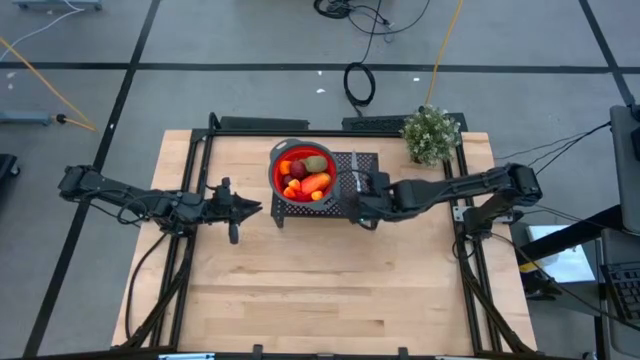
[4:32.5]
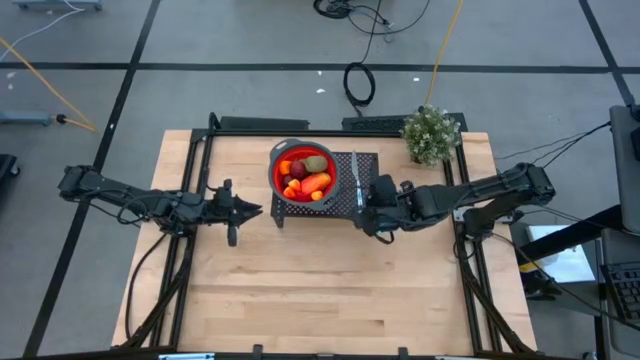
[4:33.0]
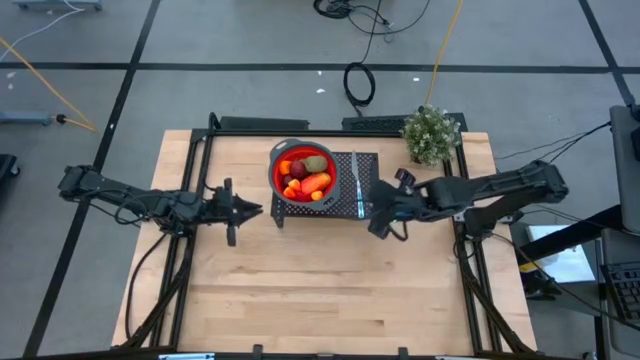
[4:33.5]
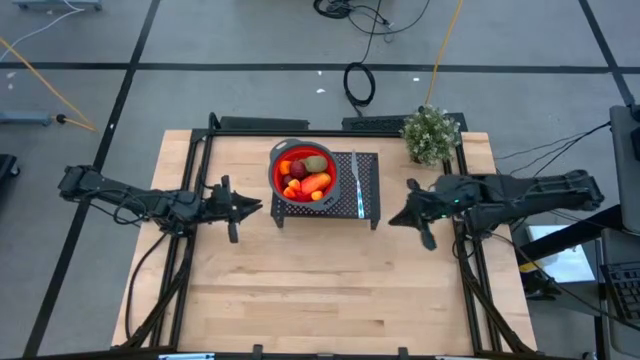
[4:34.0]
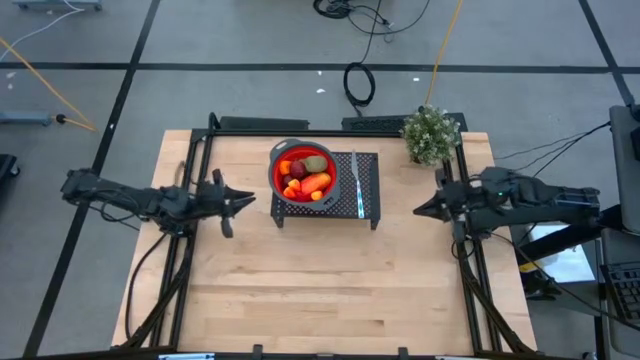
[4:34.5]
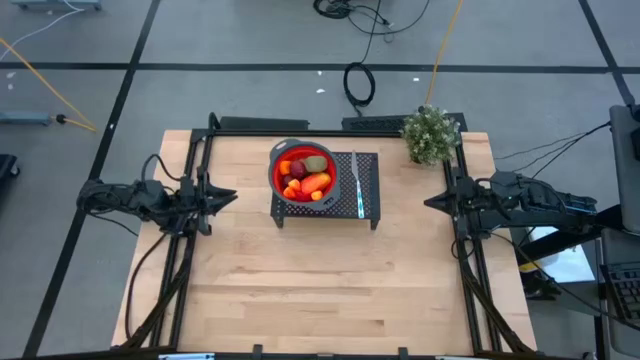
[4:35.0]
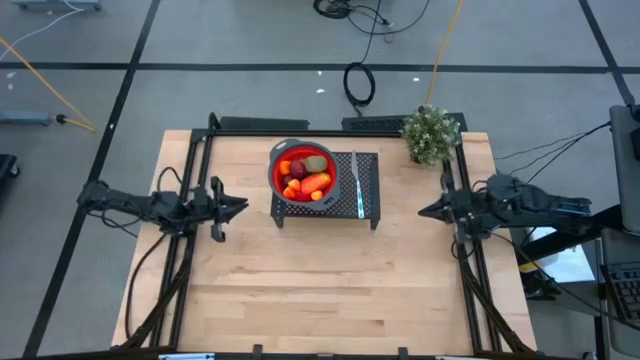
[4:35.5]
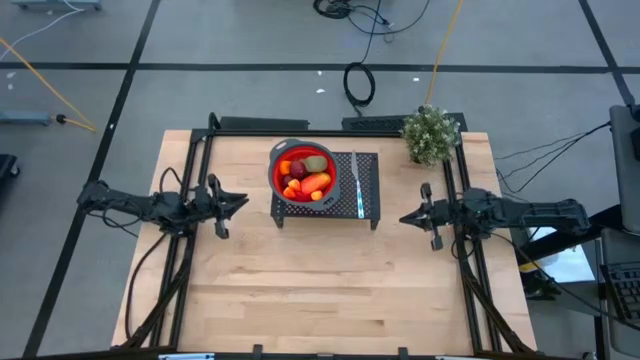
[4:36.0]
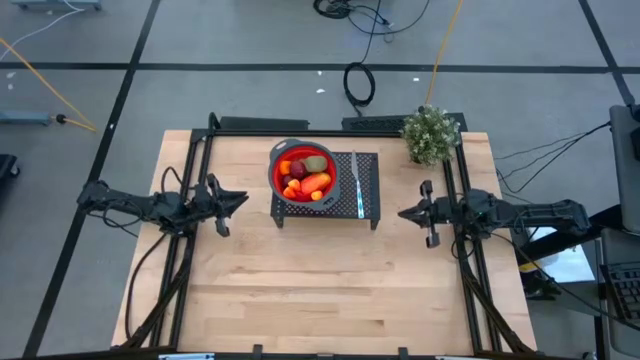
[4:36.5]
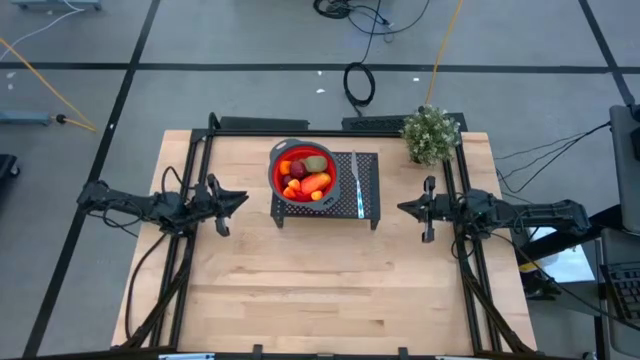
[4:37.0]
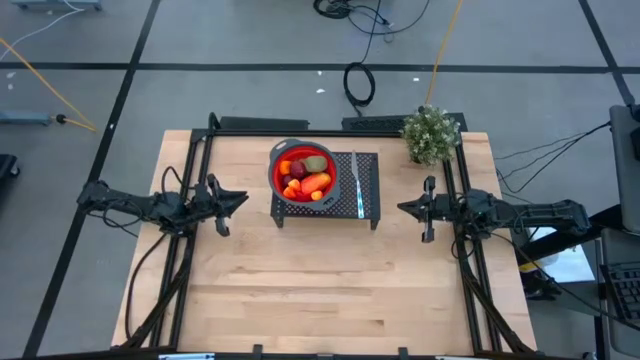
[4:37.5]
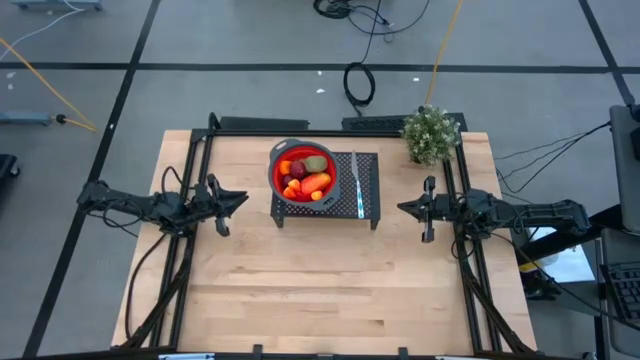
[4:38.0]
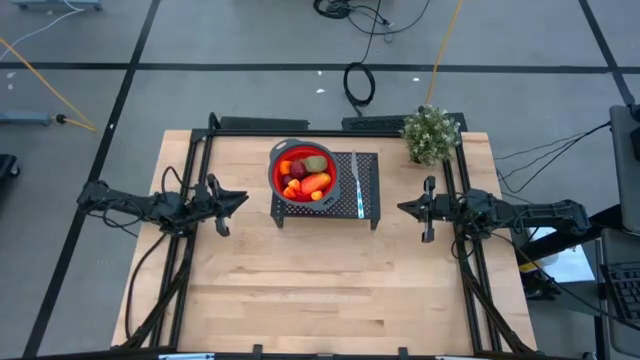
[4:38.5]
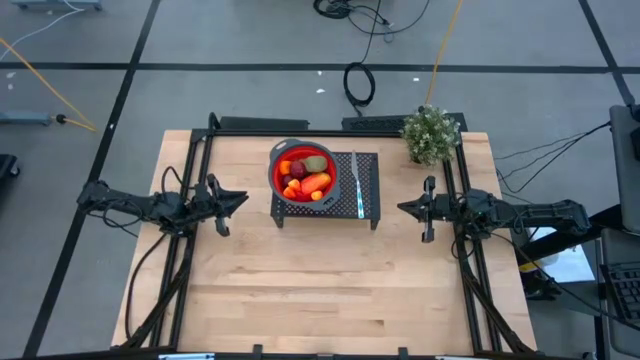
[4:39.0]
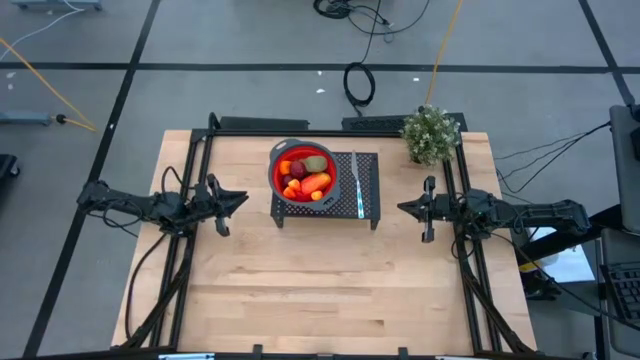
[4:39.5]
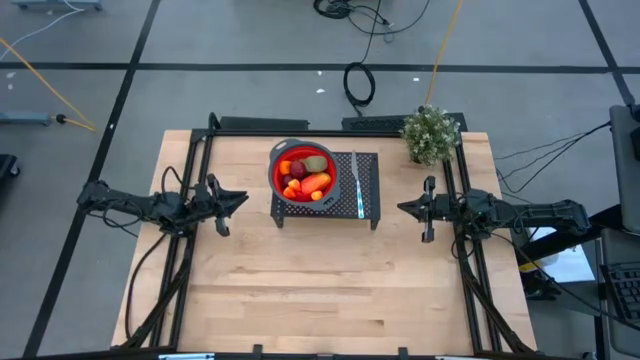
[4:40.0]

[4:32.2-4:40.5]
Task: Pick & Place Fruit
Return to Home Position

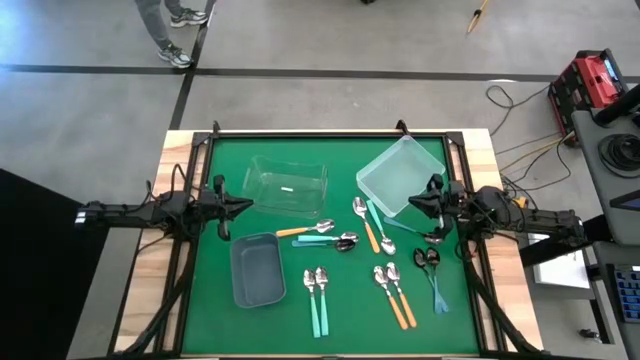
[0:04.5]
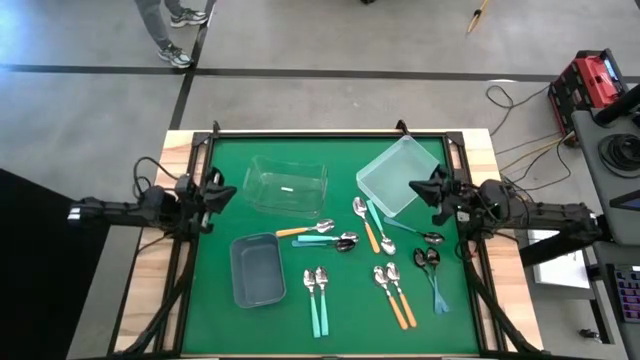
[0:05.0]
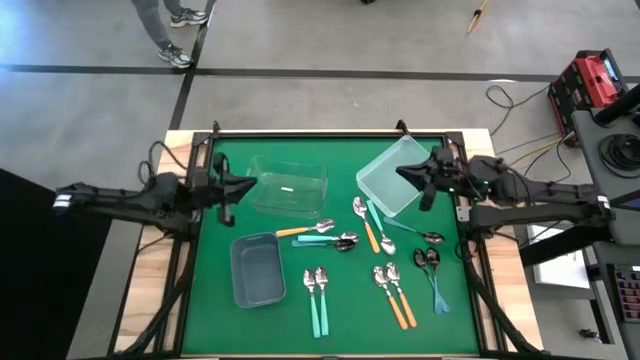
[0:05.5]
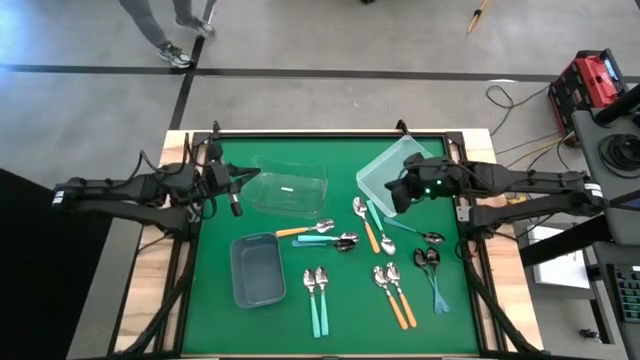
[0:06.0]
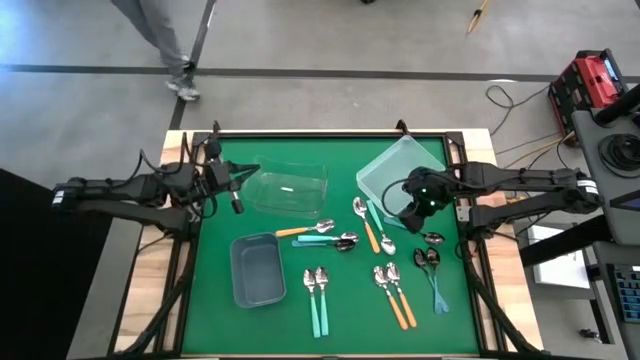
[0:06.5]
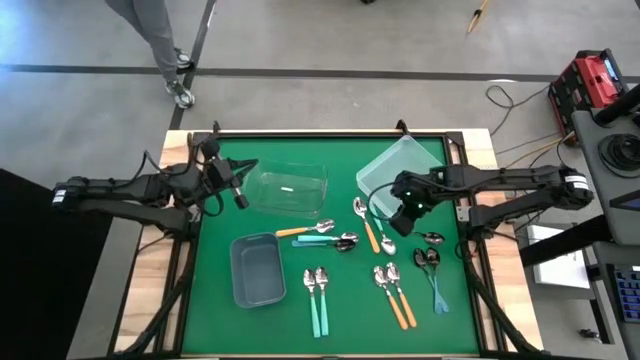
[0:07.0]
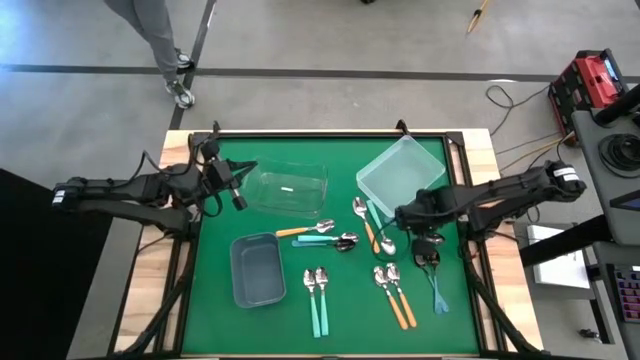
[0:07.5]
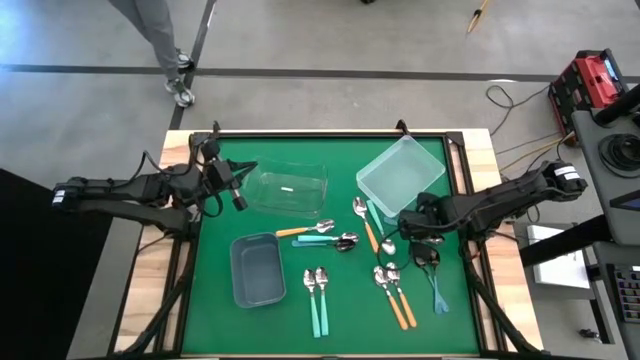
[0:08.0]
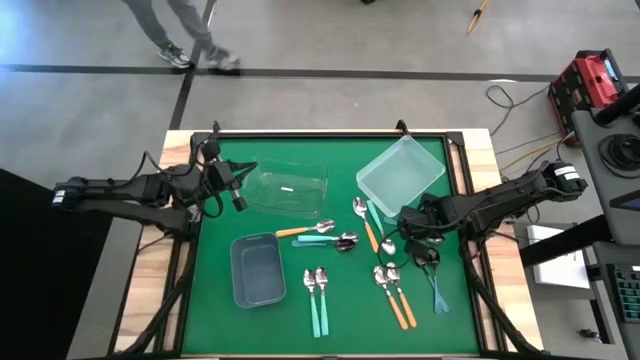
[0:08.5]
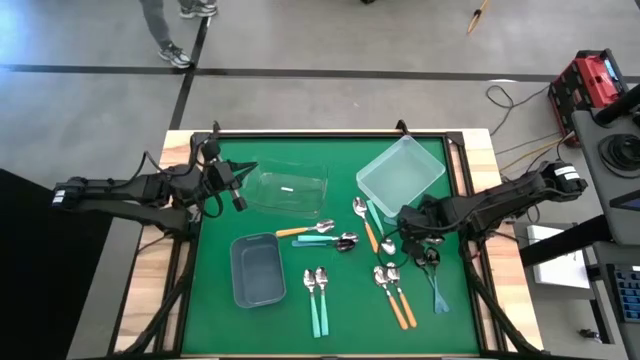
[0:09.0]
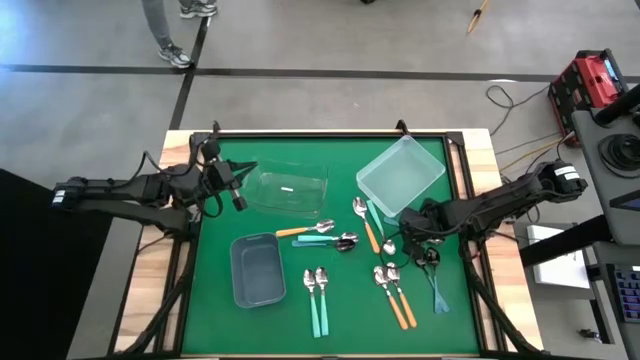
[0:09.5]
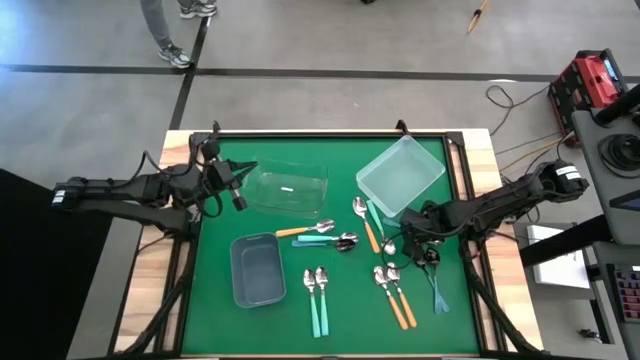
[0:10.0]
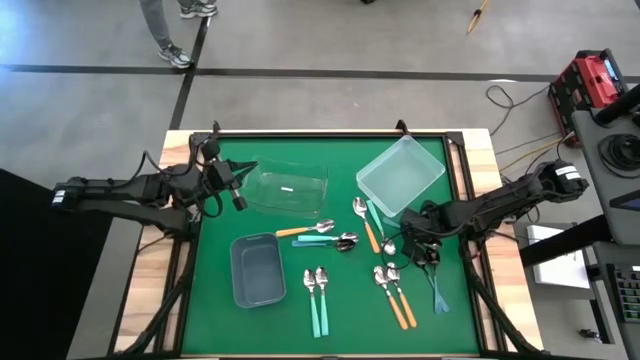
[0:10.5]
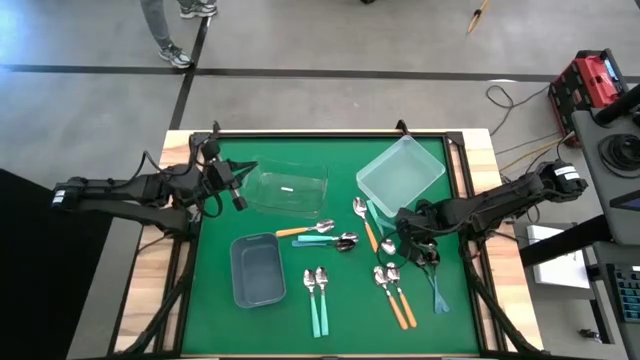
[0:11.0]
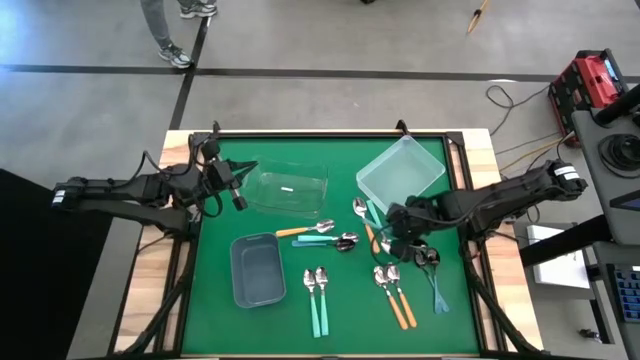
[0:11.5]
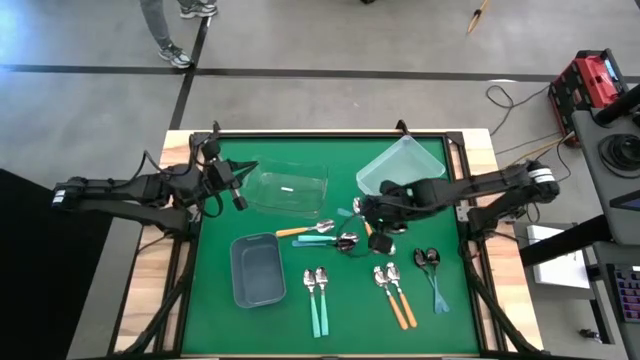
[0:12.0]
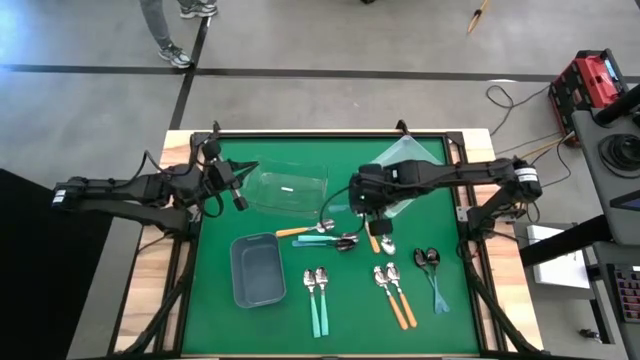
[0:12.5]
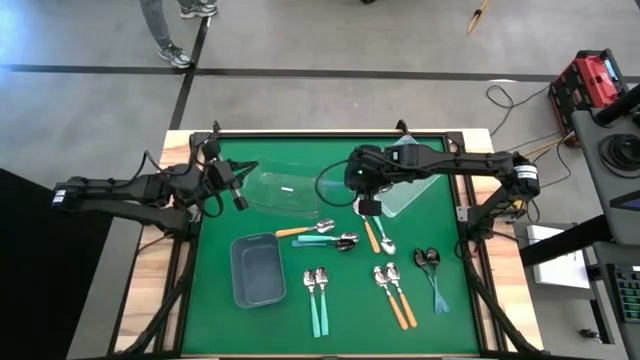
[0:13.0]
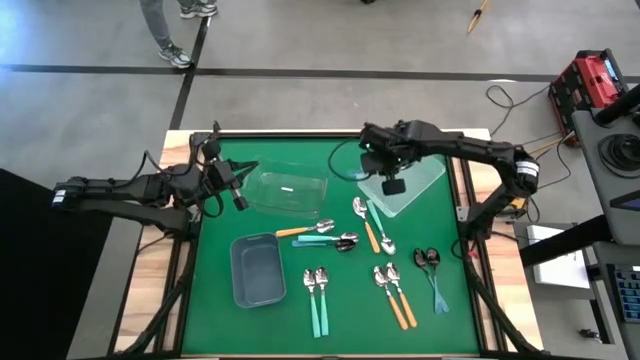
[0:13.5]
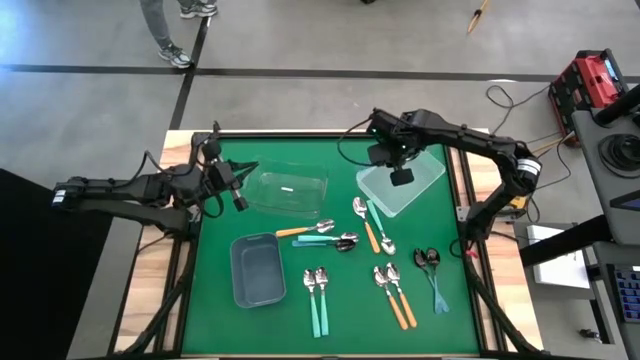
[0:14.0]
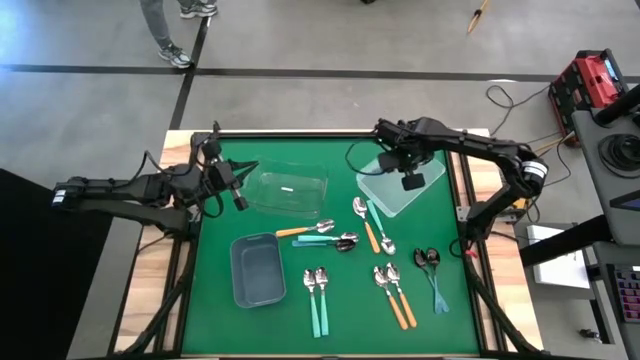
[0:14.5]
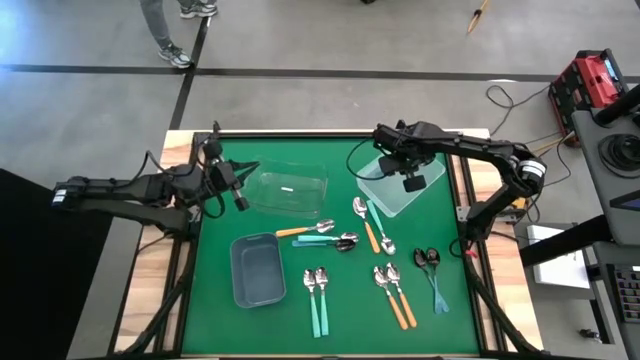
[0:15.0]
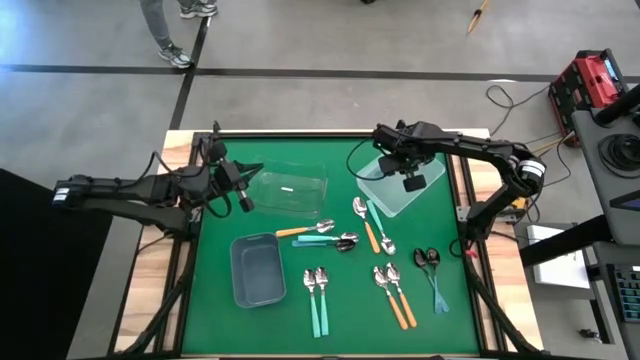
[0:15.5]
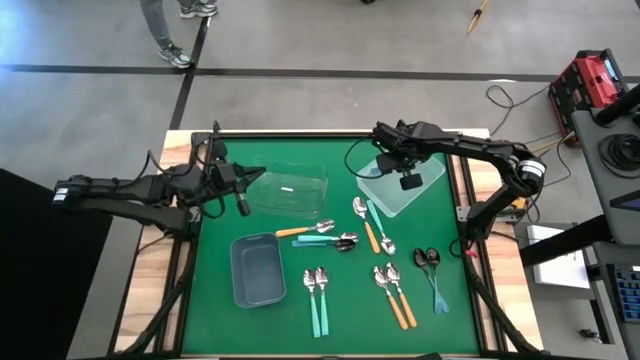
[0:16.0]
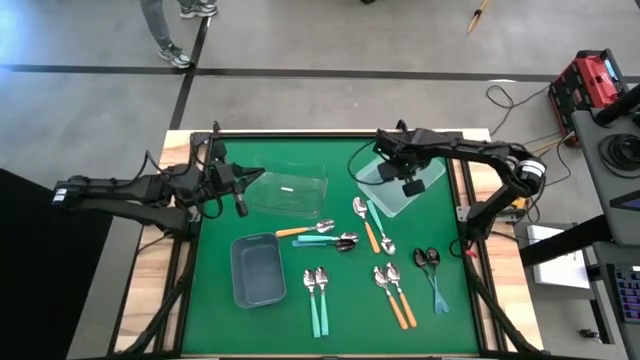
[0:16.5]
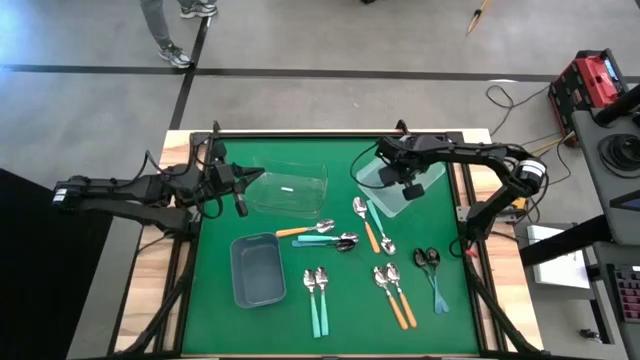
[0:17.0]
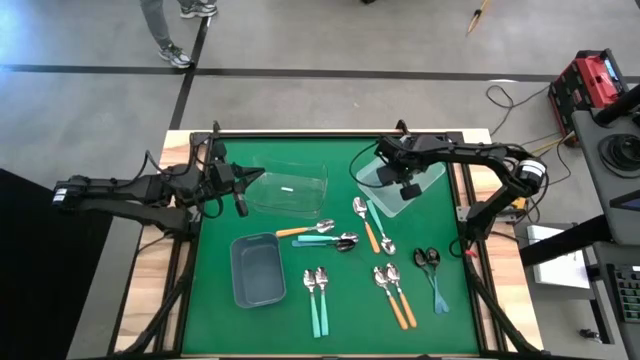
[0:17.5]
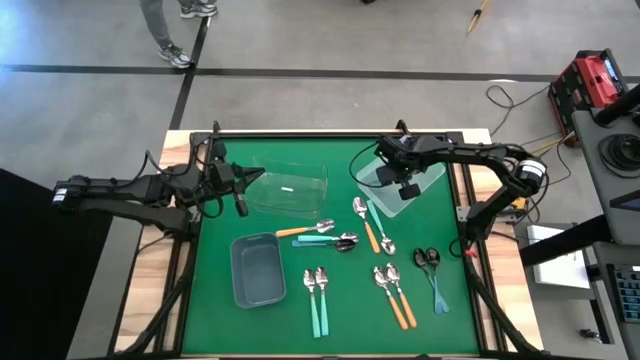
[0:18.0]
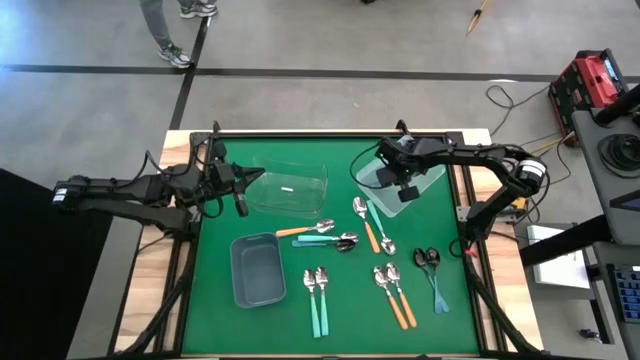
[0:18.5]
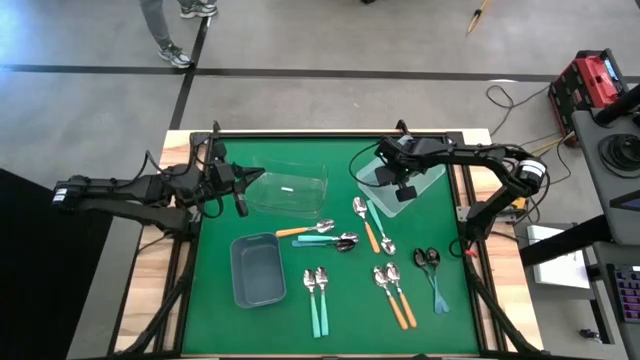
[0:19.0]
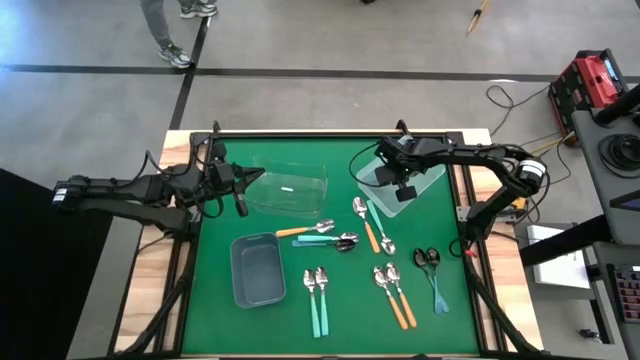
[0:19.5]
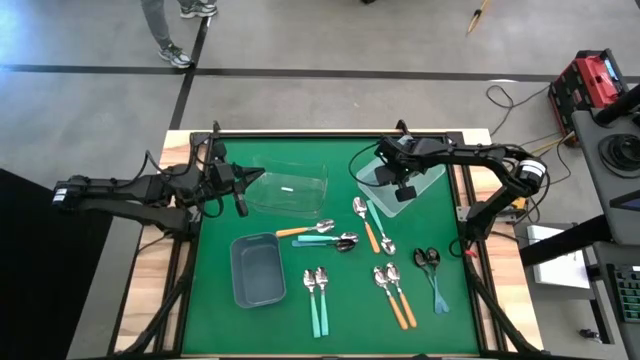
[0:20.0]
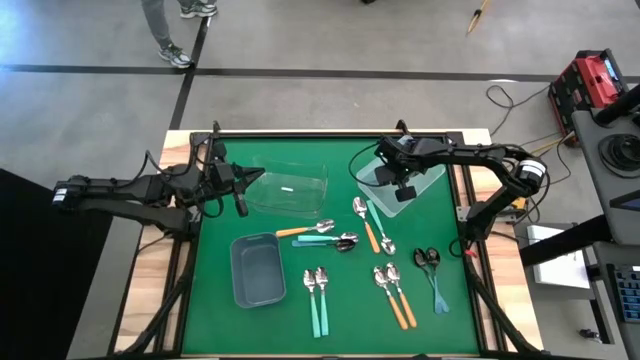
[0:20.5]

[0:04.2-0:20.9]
Task: Sort silverware by color (type)
Put the blue spoon into the white bin
